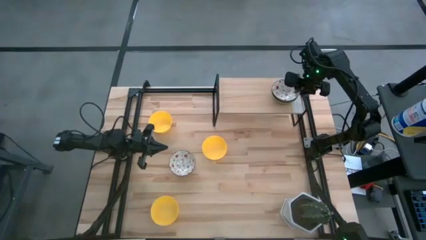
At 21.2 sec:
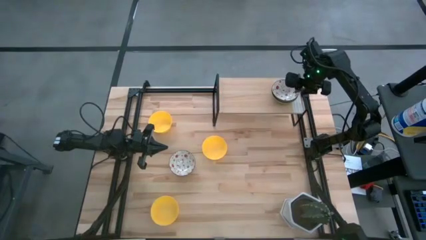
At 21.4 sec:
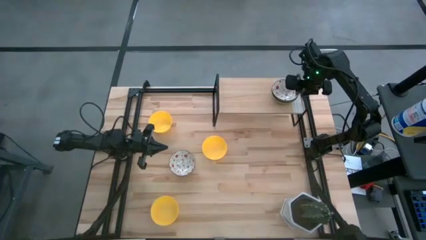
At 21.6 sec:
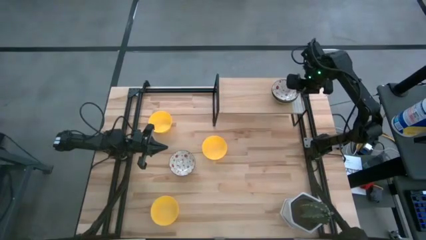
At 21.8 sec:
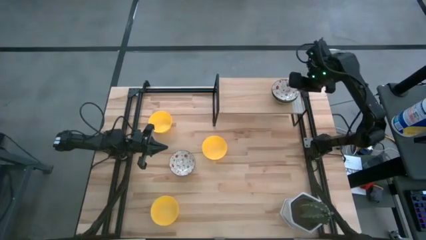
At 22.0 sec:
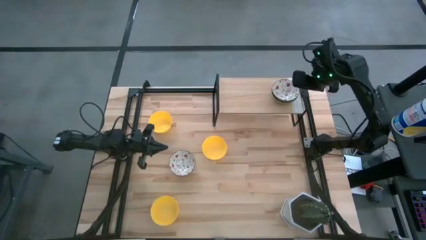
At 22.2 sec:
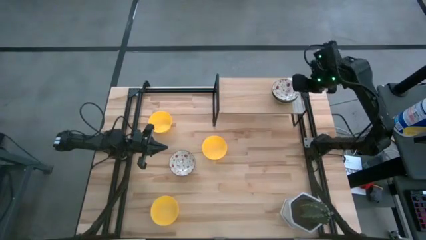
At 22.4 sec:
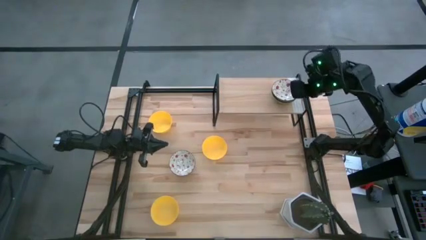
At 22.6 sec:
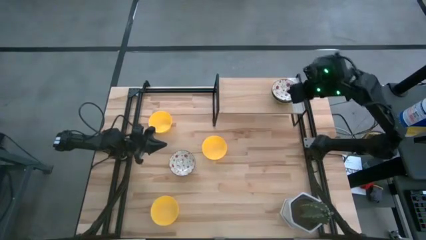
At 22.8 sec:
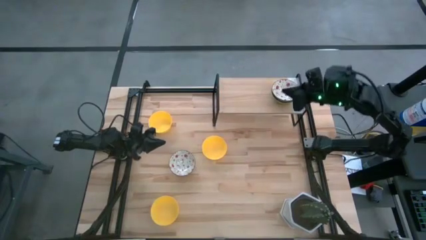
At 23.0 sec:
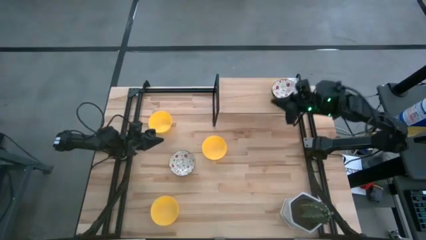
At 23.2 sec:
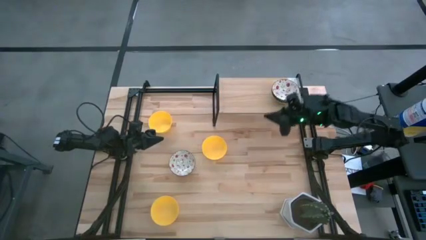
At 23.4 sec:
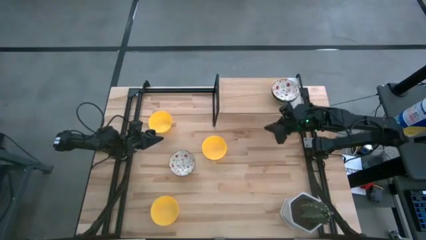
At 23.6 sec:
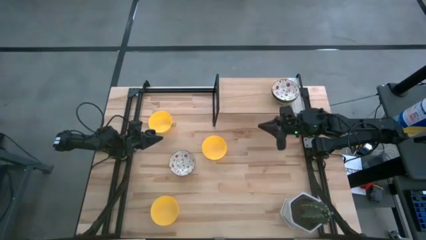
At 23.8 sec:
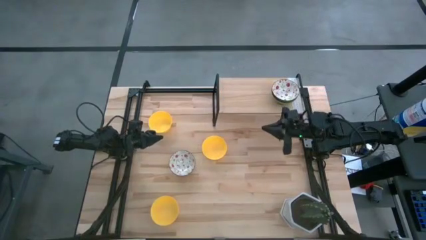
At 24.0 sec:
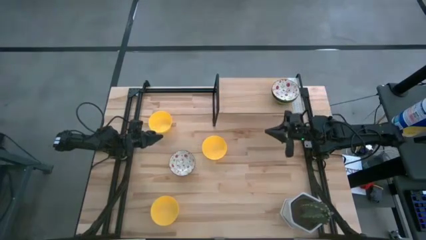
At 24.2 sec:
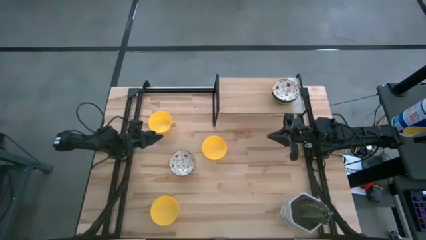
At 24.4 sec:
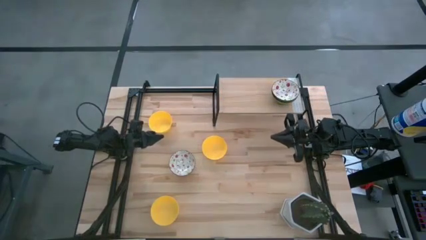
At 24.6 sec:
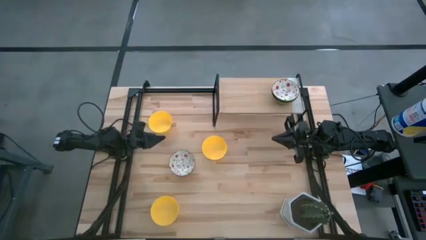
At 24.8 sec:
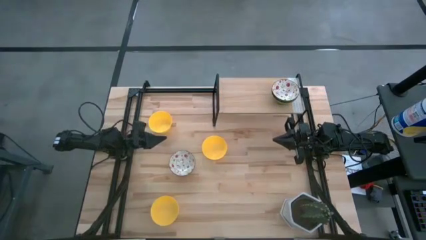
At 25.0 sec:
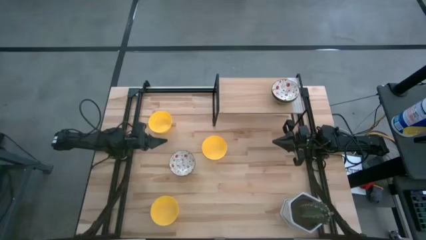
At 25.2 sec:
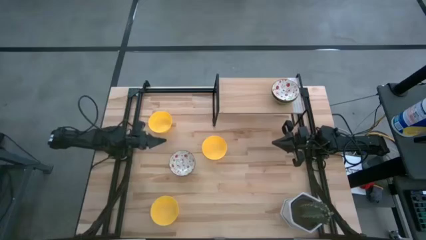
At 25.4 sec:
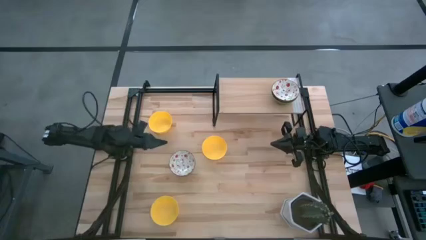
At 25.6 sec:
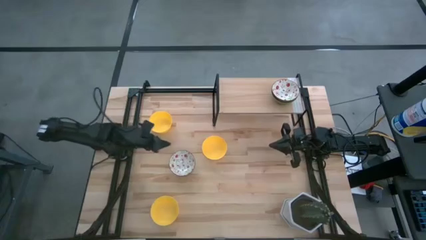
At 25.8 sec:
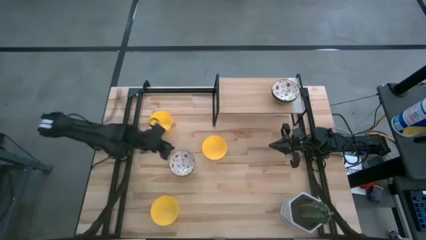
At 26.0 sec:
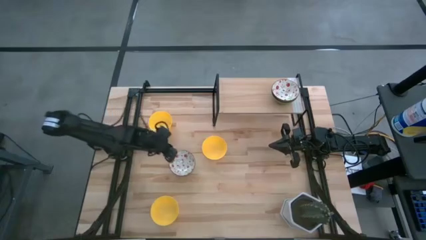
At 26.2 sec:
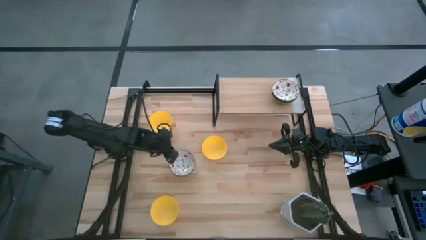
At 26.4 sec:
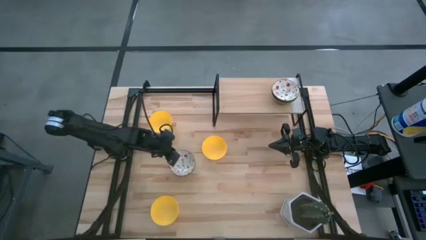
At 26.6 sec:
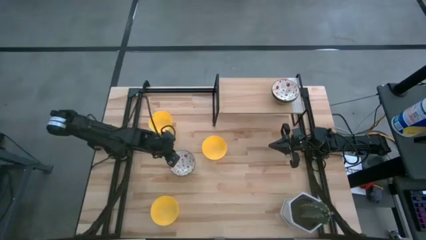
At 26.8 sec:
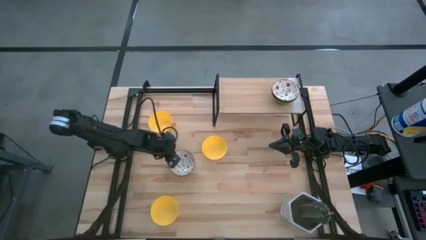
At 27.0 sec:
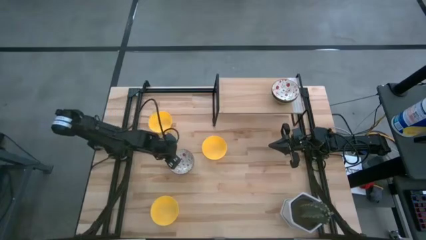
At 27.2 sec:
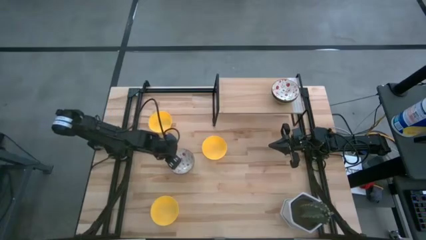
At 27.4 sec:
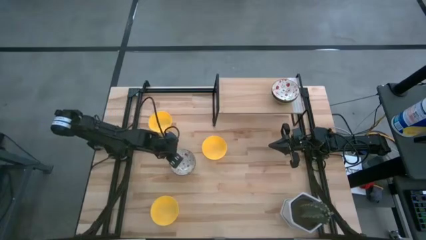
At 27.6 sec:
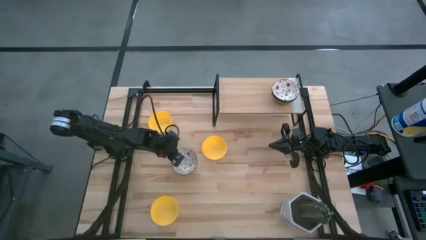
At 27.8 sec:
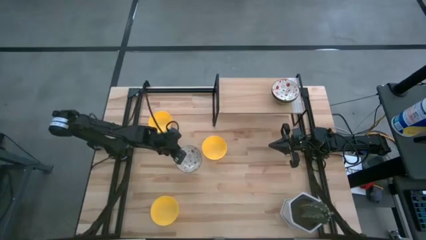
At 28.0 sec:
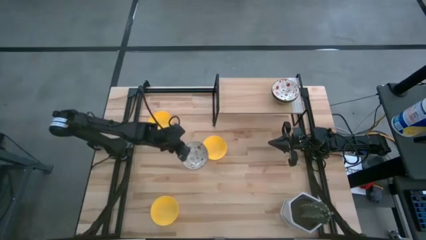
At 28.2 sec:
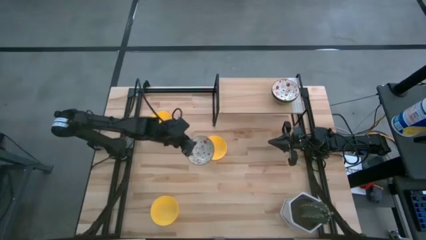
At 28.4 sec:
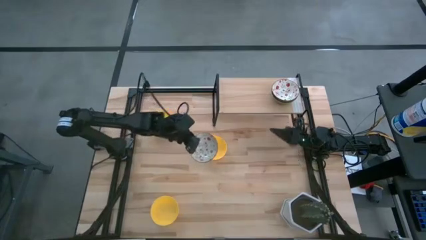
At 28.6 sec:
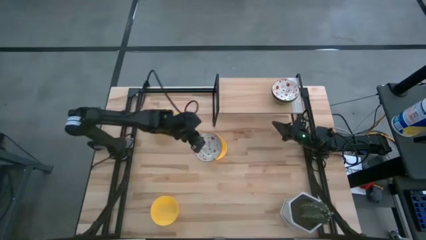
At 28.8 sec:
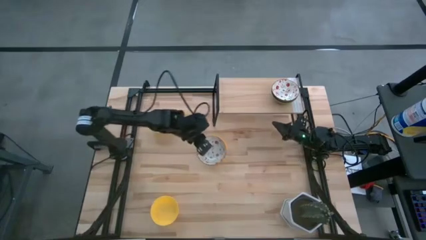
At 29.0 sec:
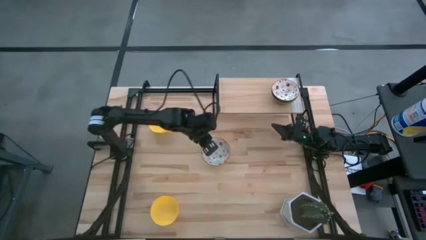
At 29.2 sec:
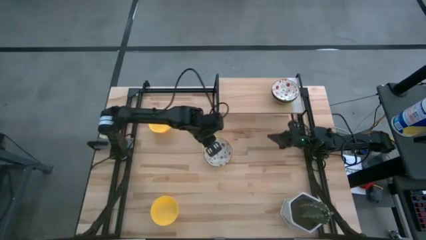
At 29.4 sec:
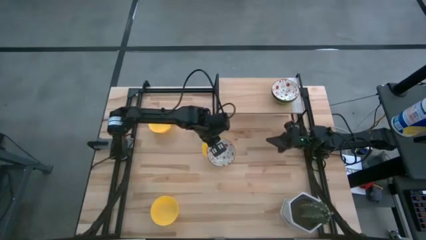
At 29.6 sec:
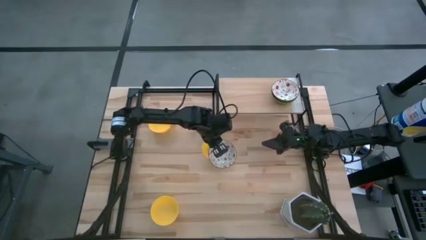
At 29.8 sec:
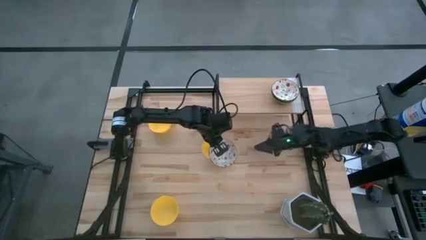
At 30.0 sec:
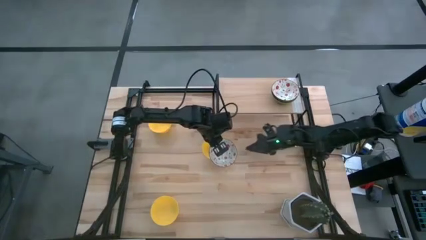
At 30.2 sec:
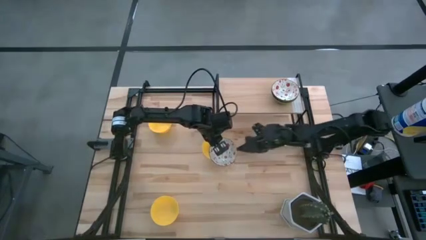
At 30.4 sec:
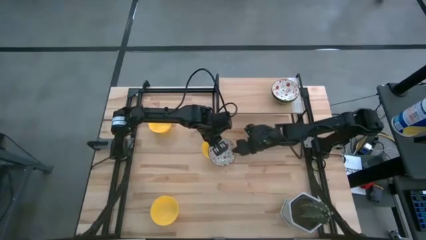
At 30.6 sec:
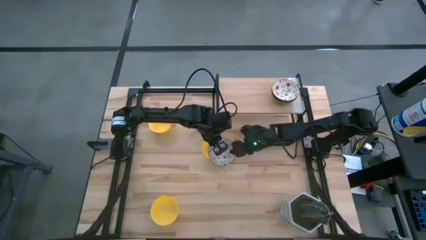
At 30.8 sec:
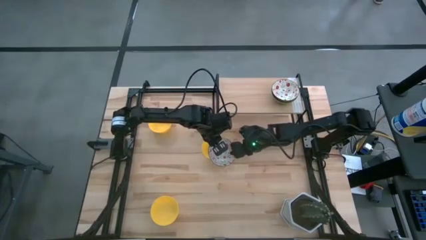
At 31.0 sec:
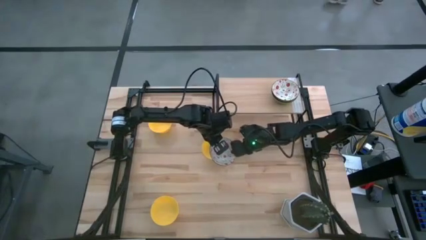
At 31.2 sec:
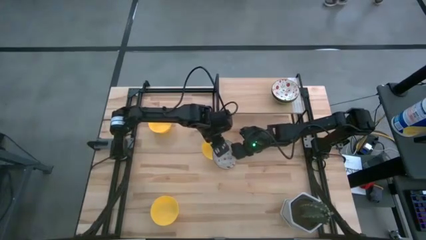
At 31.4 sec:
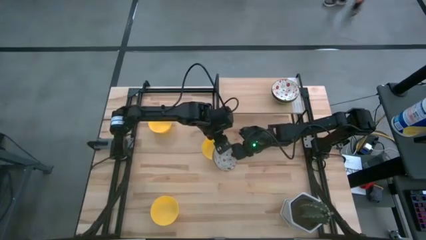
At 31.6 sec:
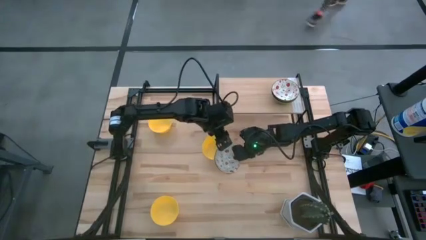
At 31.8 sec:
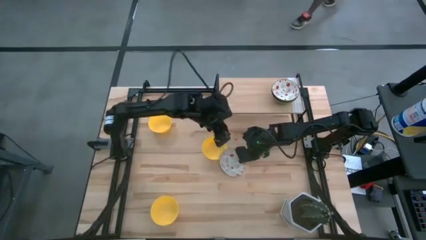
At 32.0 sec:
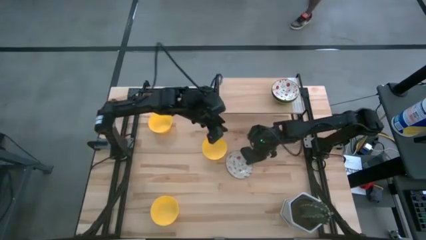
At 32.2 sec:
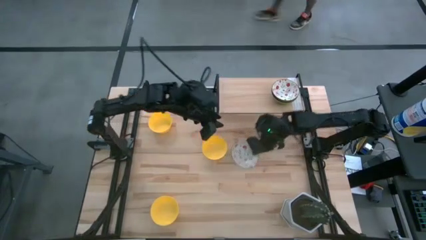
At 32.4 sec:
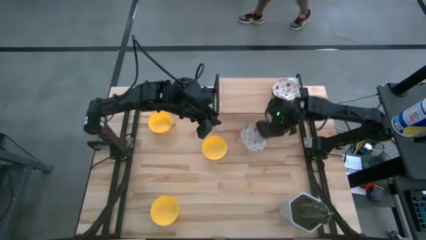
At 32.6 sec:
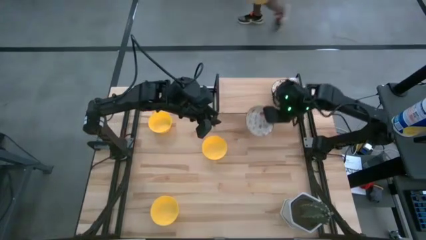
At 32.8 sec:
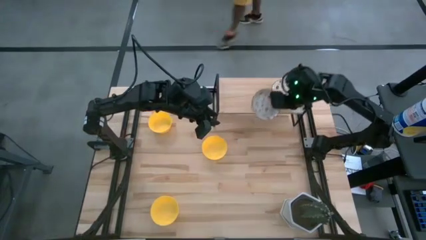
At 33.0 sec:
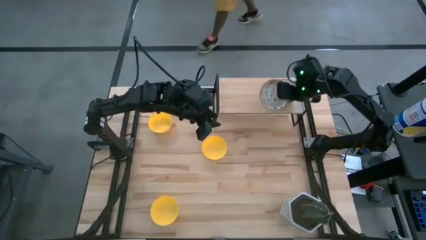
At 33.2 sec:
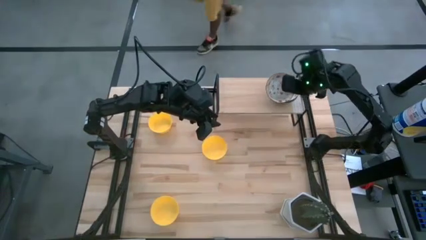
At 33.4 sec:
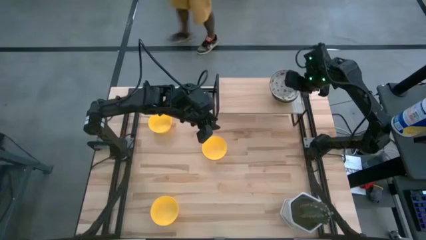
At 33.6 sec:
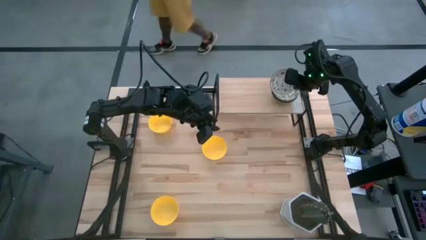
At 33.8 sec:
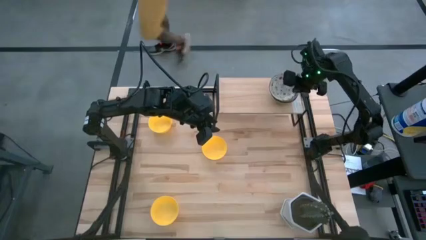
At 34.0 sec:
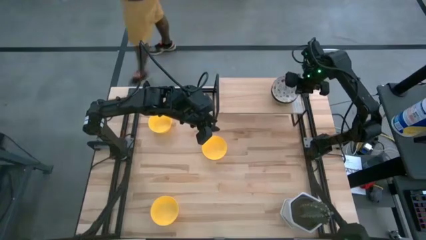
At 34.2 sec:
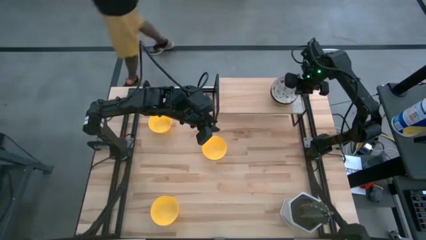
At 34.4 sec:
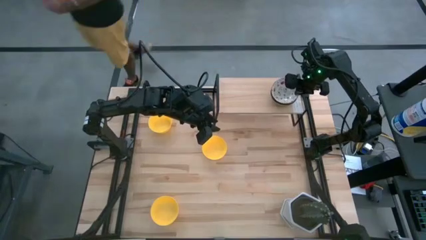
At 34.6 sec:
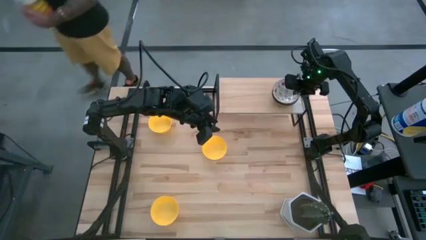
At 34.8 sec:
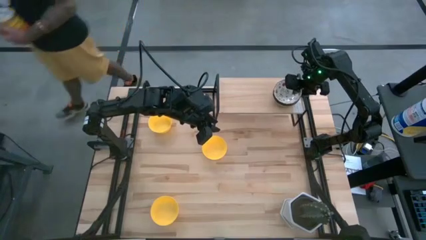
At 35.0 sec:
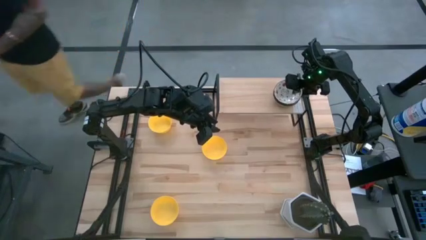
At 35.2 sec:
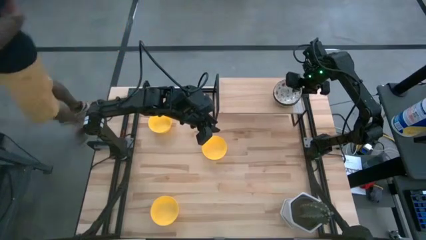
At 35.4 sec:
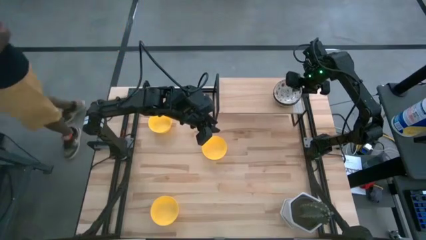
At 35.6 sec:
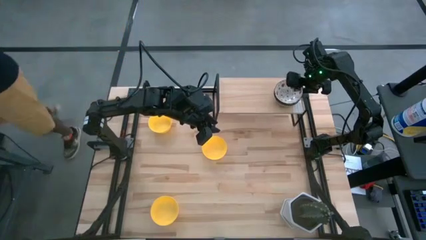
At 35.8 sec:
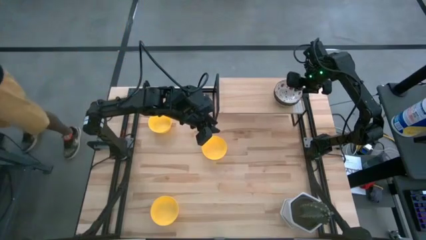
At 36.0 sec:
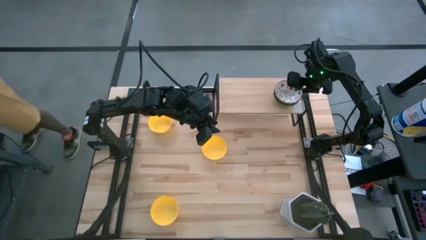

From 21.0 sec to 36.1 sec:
Task: Pick & Place Mini bowls
Stack the white patterned bowl on the white patterned bowl on the shelf
